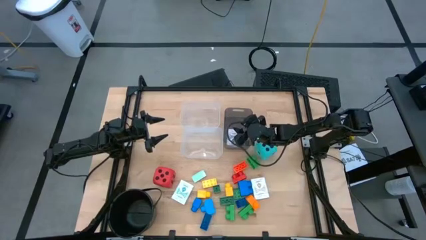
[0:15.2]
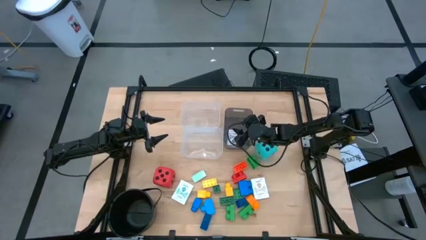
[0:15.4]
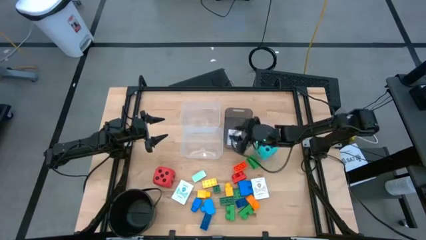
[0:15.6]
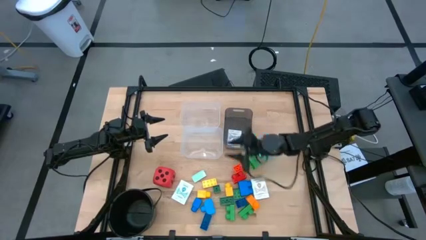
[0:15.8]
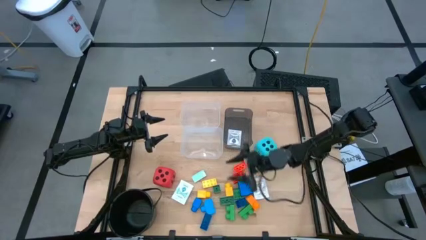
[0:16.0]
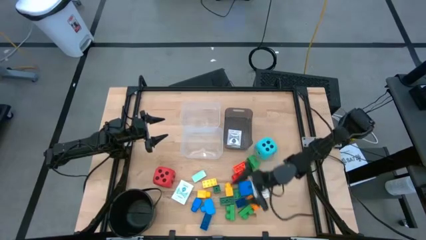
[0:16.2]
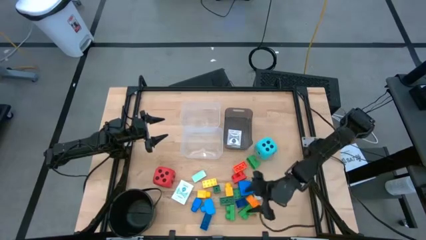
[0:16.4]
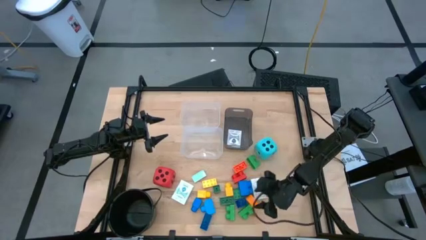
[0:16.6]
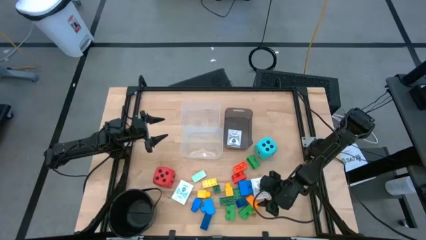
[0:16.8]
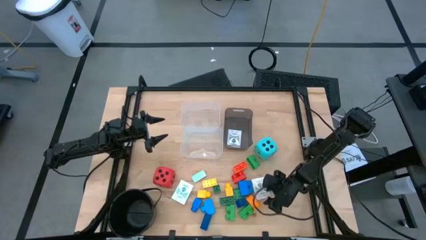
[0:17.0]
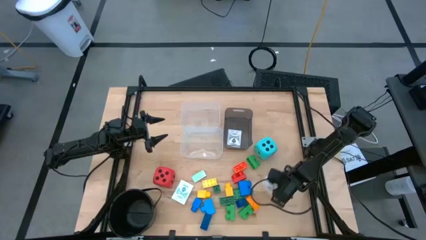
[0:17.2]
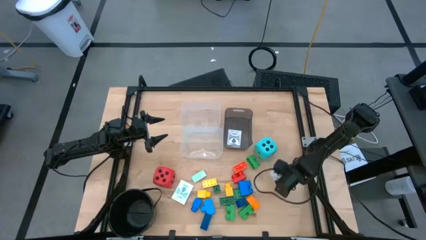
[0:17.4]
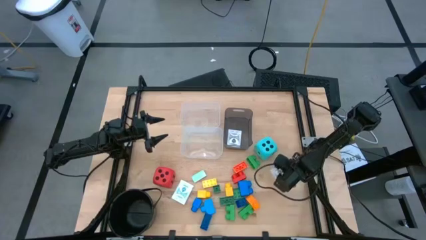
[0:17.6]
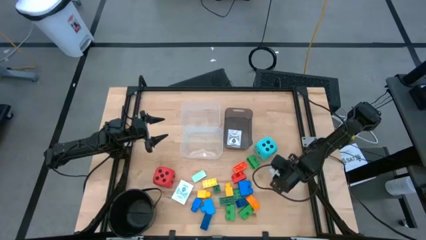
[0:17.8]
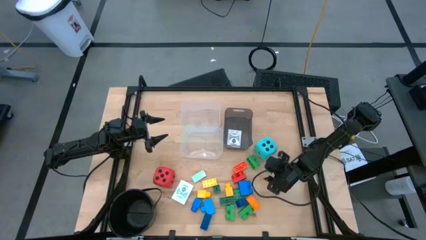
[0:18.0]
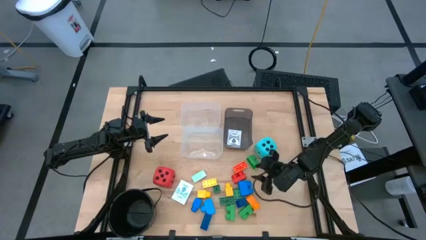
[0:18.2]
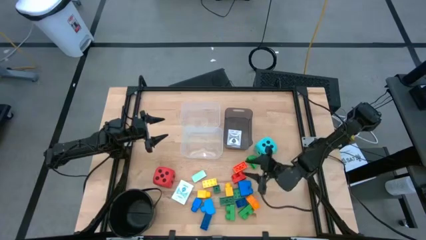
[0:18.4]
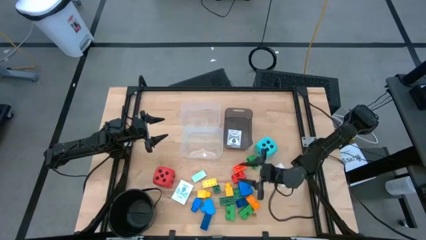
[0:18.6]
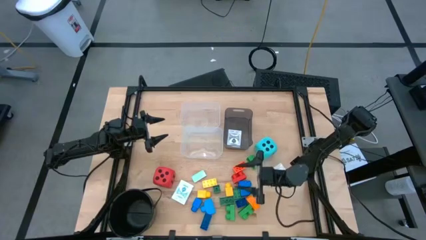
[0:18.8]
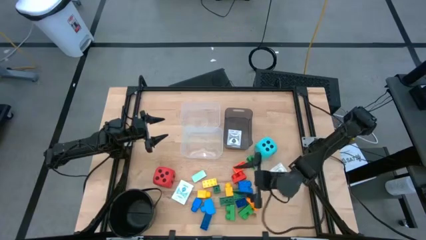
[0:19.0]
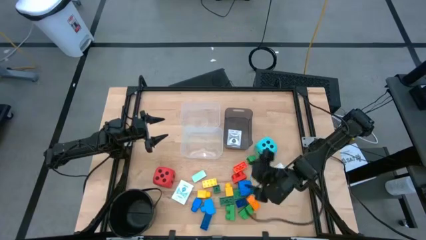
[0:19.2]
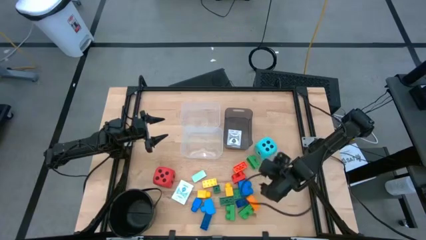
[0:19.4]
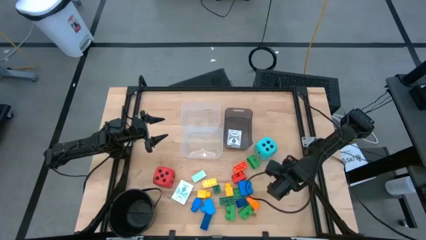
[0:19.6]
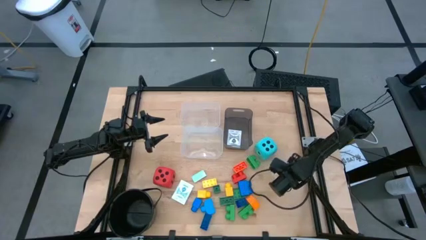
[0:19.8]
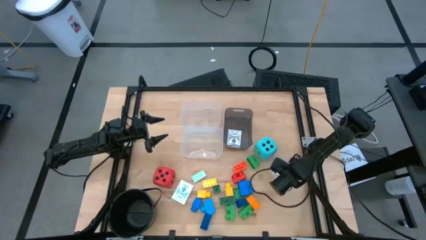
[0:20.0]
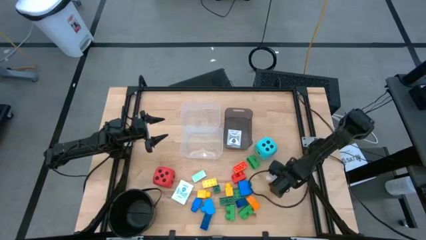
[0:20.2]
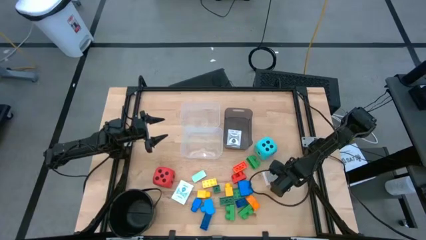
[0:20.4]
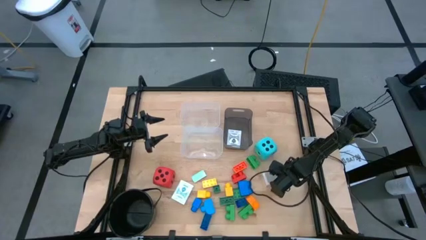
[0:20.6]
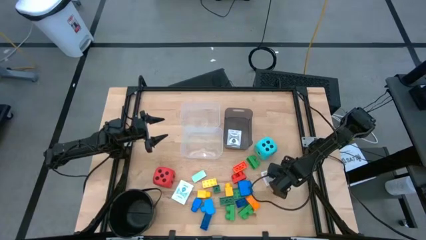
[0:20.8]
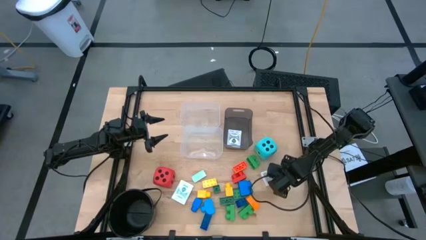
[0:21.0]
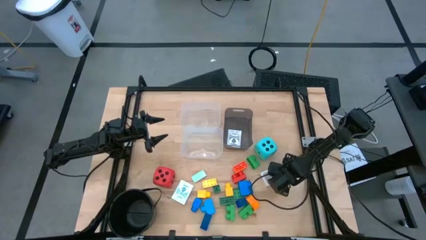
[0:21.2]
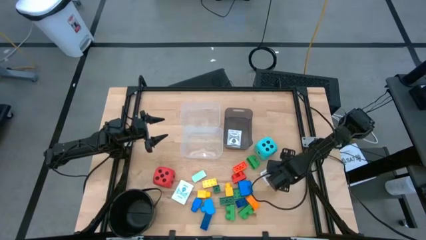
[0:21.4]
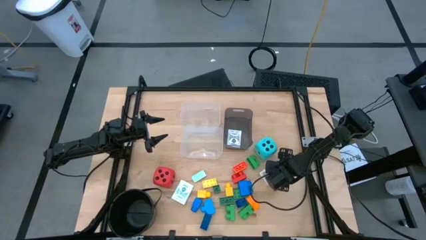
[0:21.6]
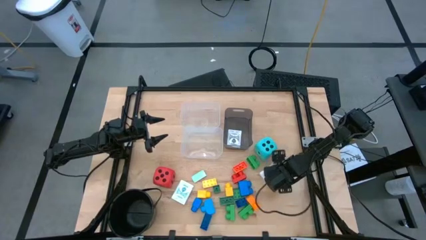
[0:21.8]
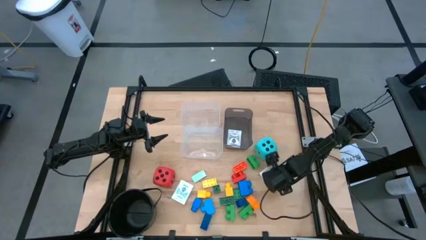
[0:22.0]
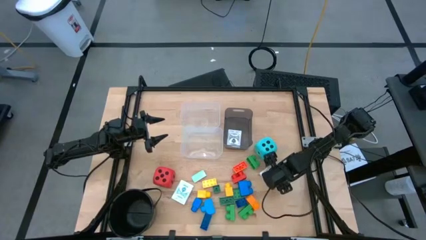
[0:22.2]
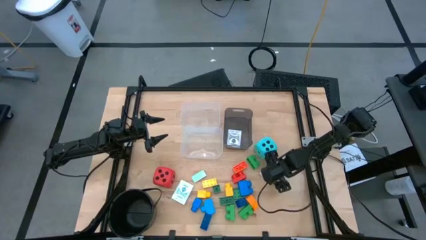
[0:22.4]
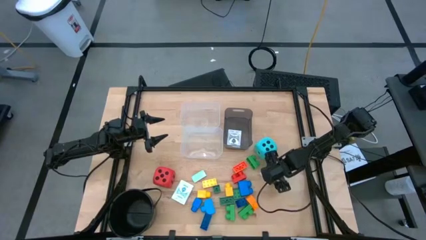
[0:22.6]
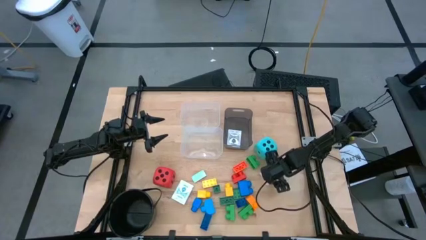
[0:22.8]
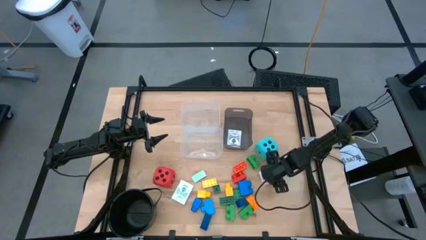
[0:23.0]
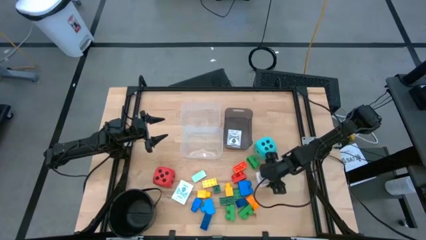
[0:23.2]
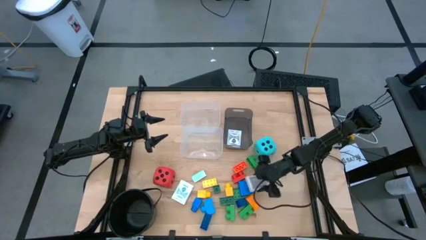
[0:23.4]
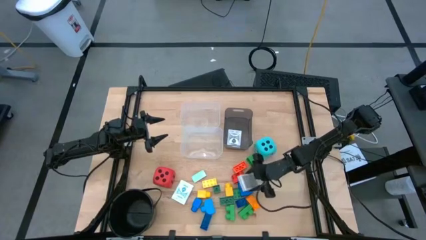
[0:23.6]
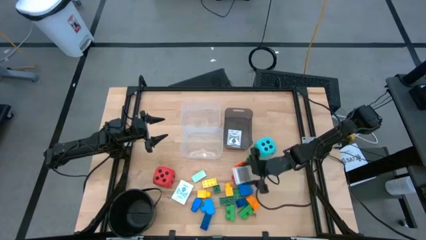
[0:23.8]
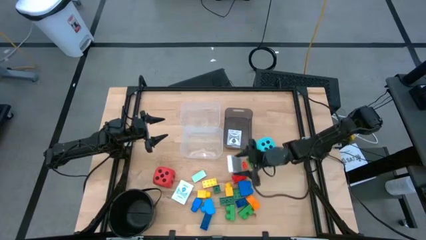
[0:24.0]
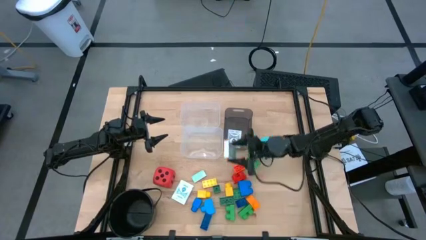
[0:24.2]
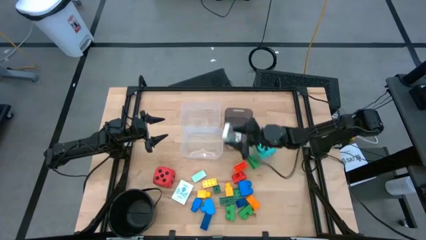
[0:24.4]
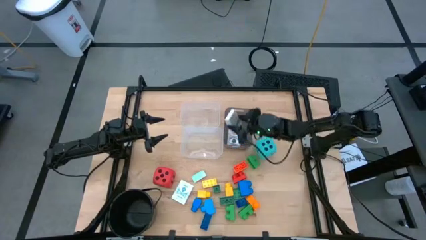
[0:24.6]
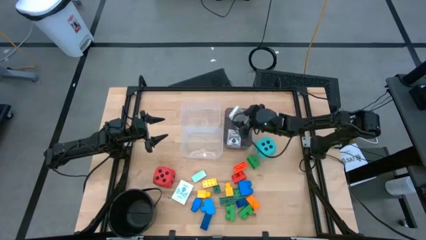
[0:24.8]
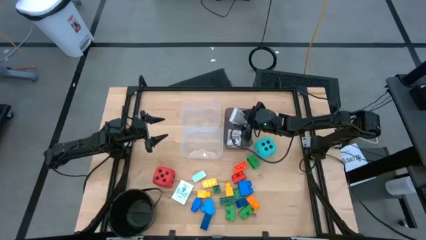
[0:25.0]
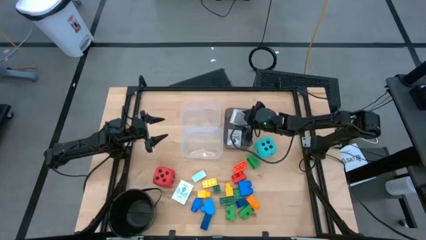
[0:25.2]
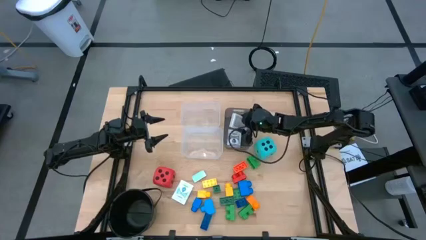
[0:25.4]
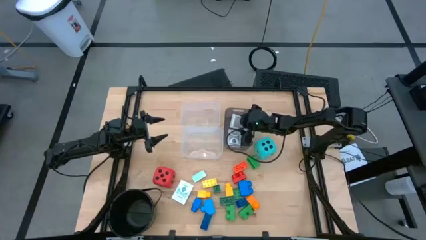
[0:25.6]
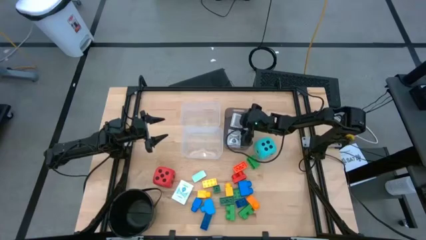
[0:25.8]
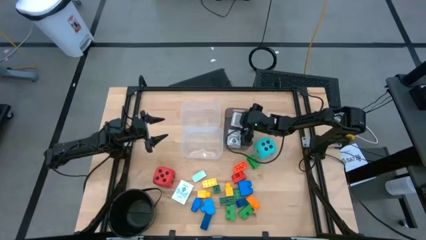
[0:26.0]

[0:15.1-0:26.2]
Task: Pick & Place Toys
Put the brown deck of cards into the black bin

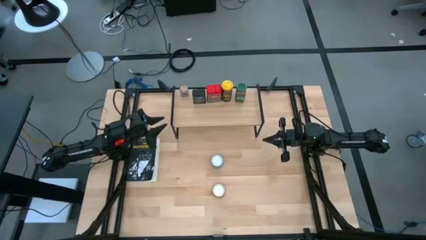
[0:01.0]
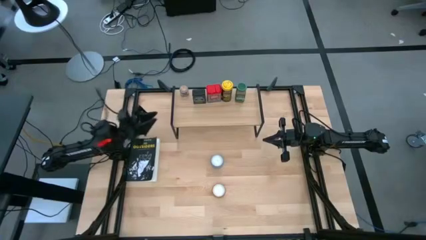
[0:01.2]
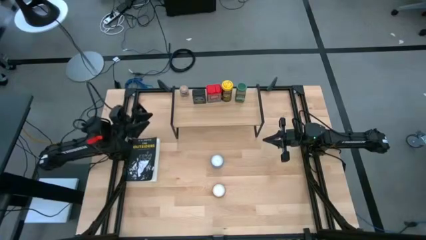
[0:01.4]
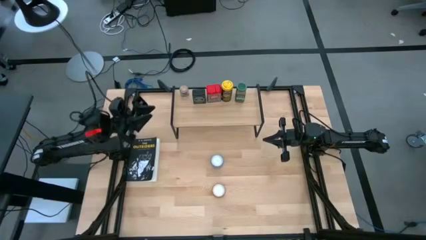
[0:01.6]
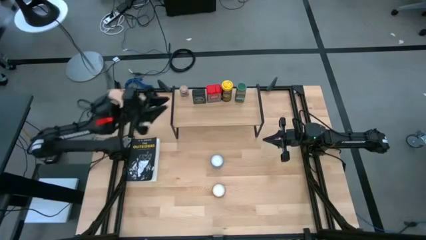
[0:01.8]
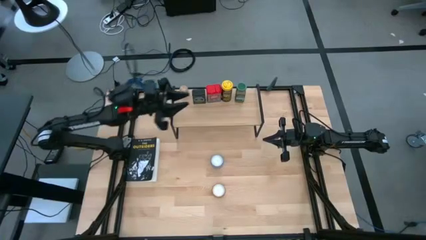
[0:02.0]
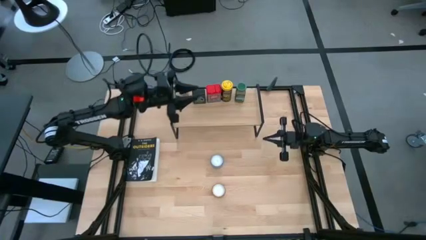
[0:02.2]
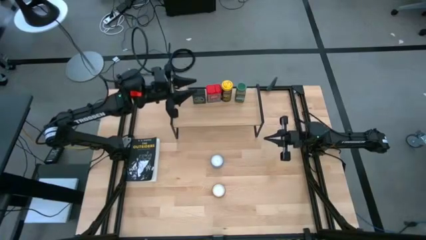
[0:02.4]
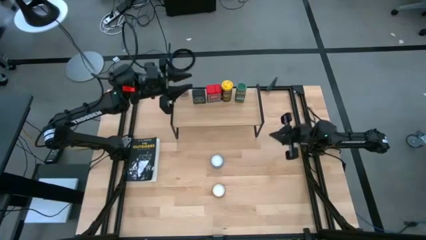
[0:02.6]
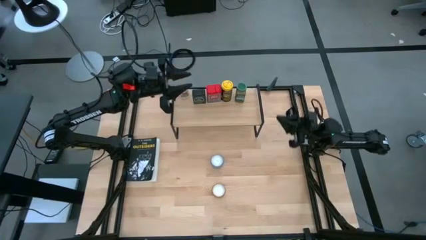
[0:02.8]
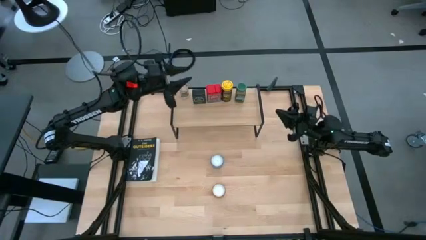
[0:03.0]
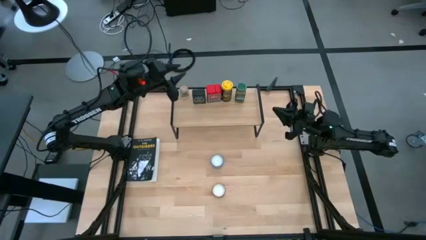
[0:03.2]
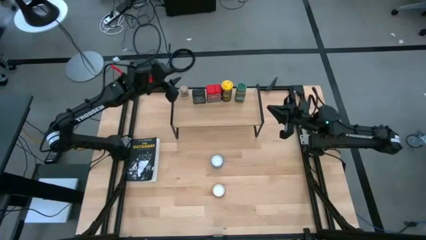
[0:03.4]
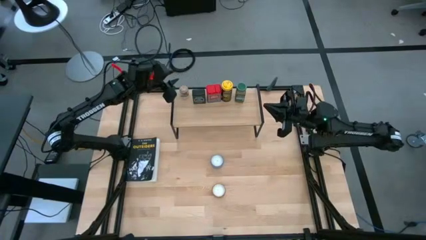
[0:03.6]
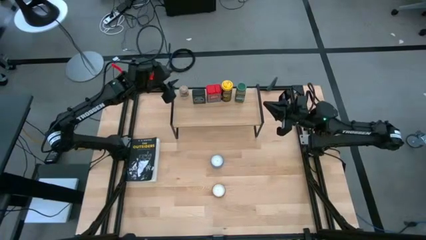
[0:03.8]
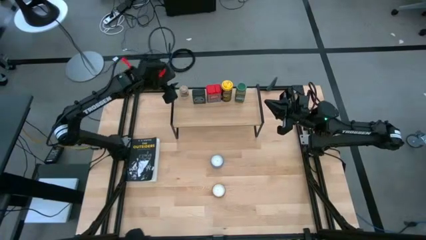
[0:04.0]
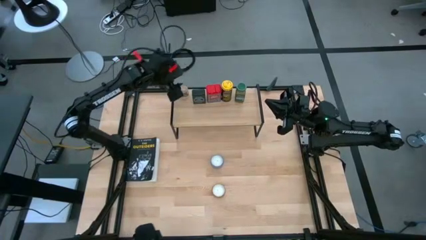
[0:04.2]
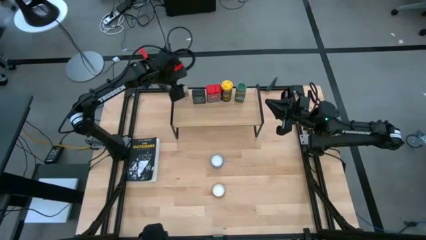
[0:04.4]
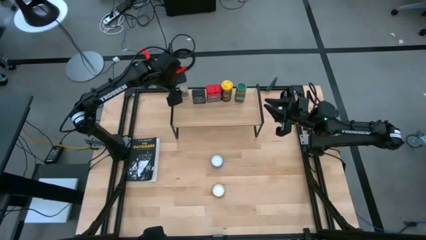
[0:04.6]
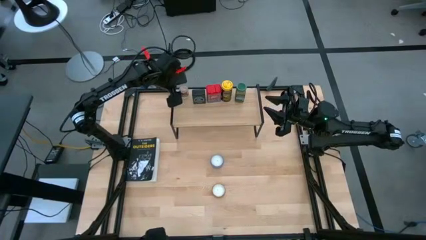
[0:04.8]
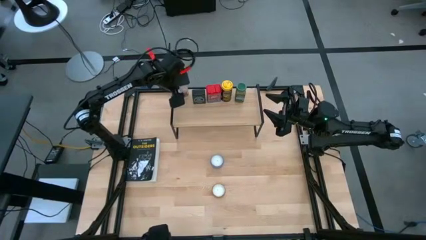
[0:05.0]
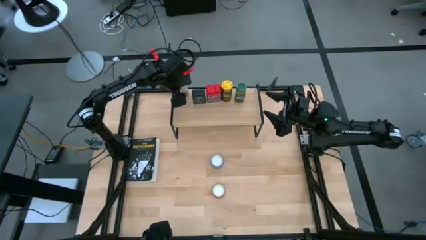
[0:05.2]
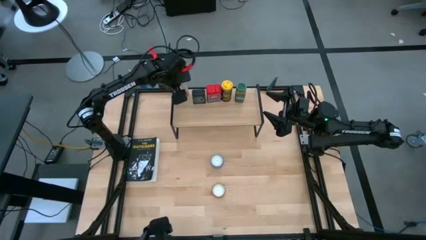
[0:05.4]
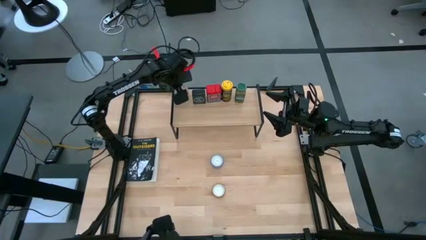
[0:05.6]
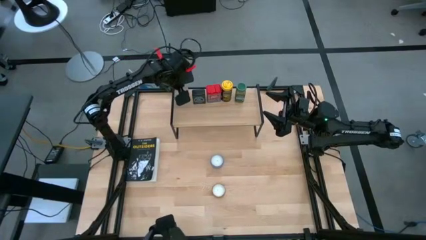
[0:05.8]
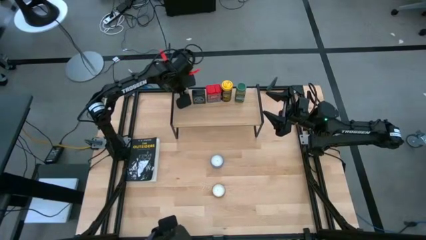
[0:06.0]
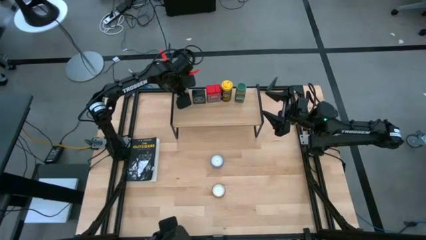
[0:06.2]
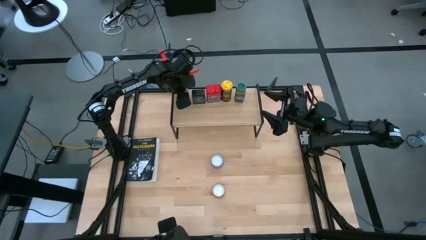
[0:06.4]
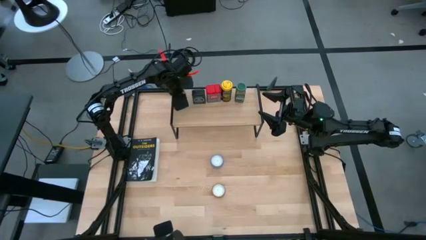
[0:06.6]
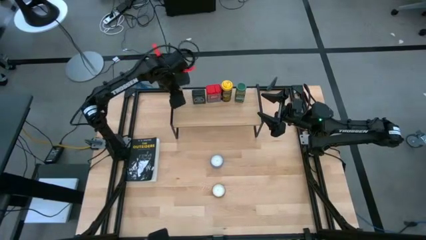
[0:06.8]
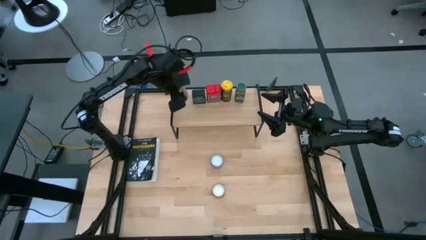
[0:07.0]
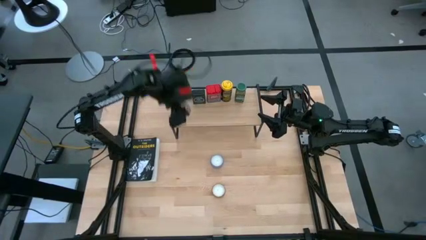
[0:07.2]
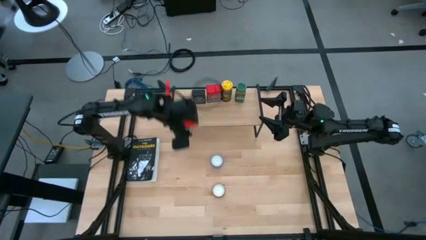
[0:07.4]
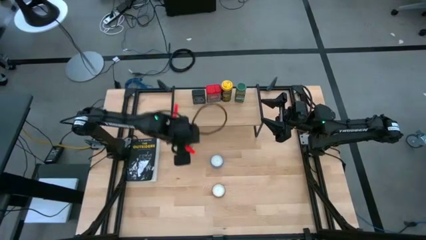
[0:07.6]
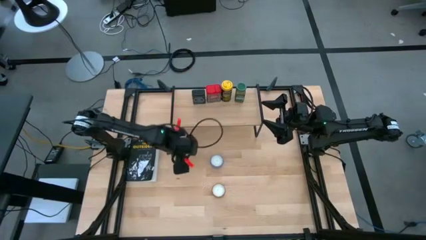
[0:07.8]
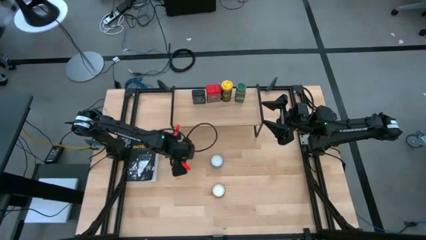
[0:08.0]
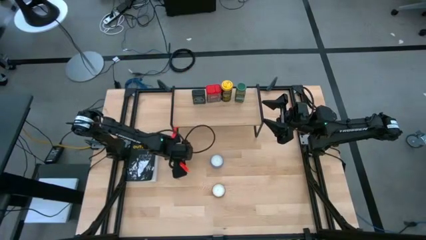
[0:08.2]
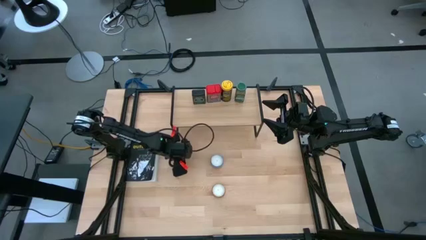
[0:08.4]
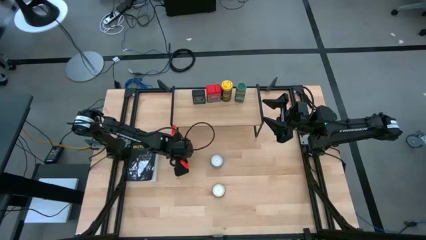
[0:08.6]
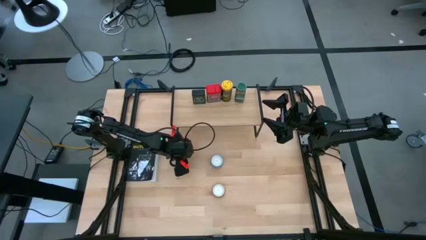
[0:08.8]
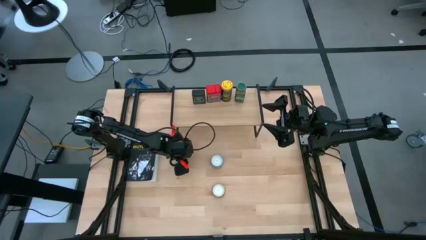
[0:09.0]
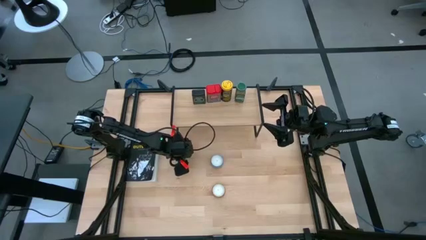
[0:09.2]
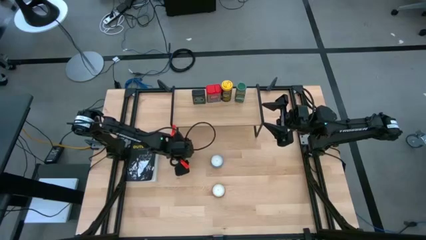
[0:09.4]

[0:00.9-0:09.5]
Task: Shelf spices
Remove the brown seasoning bottle from the shelf
